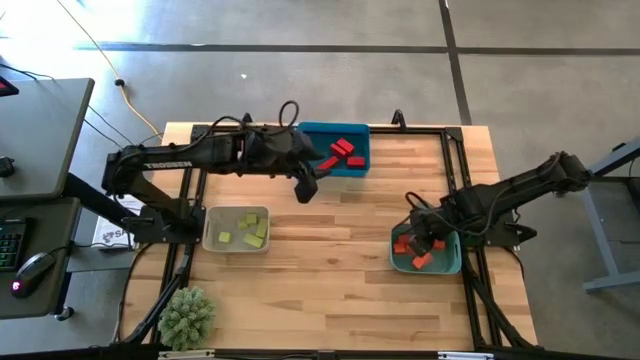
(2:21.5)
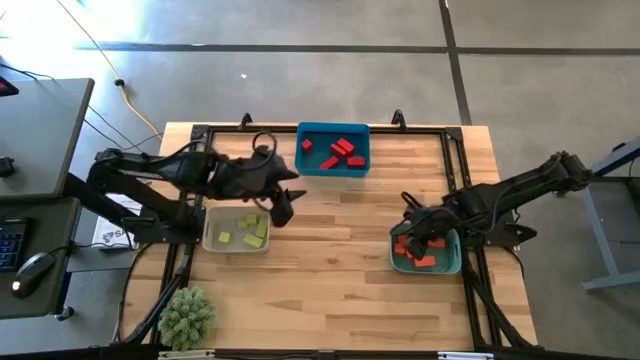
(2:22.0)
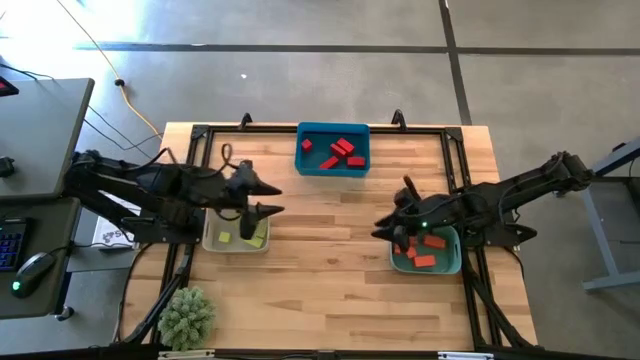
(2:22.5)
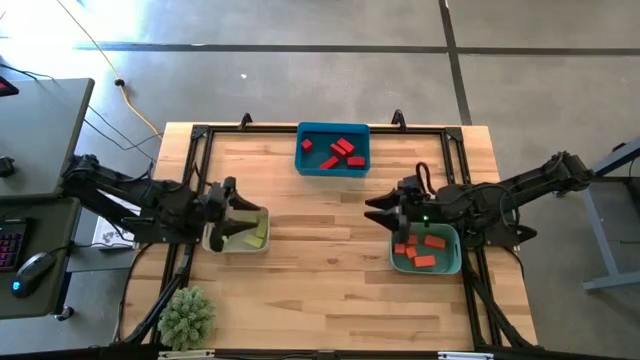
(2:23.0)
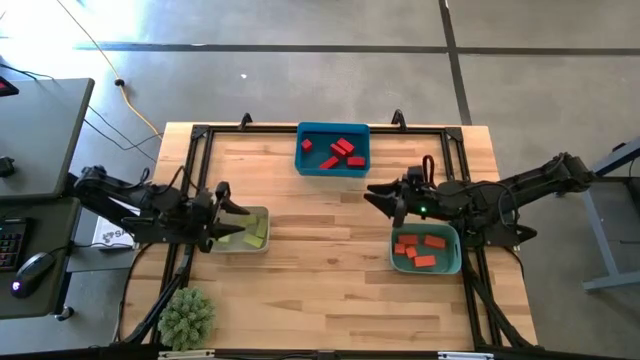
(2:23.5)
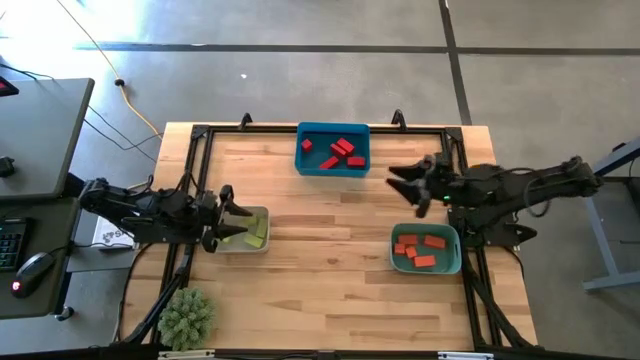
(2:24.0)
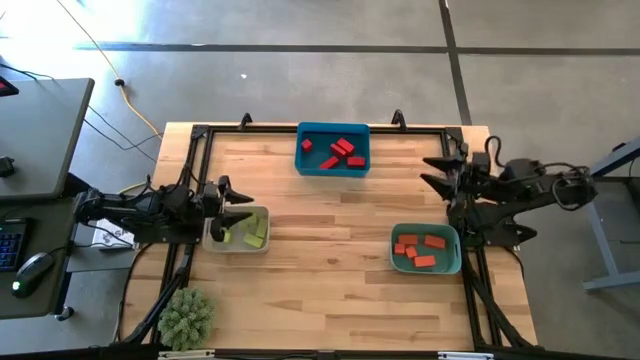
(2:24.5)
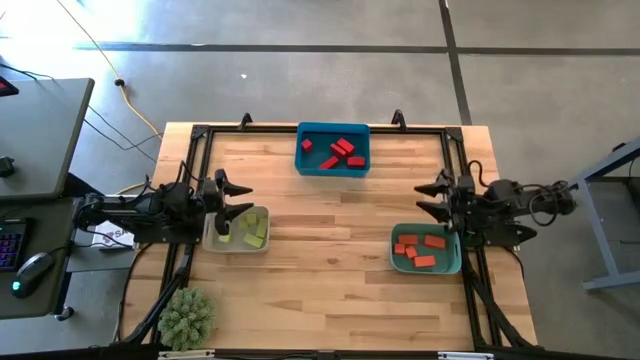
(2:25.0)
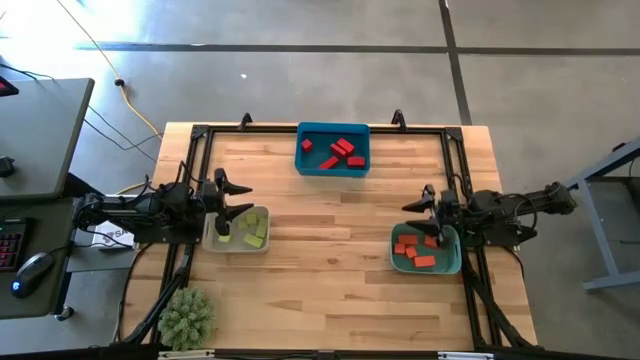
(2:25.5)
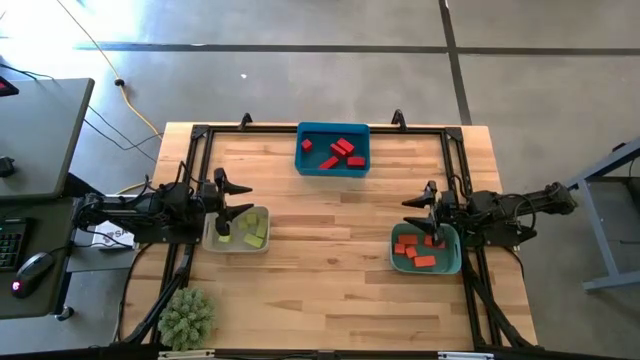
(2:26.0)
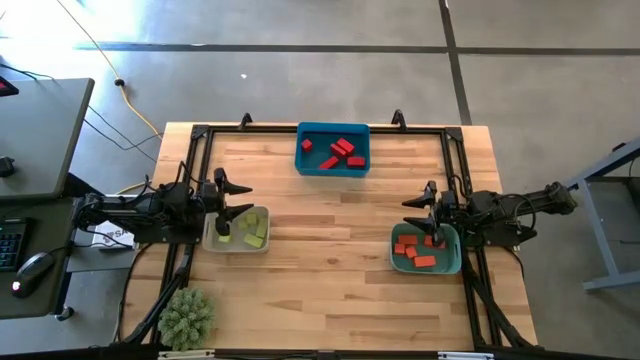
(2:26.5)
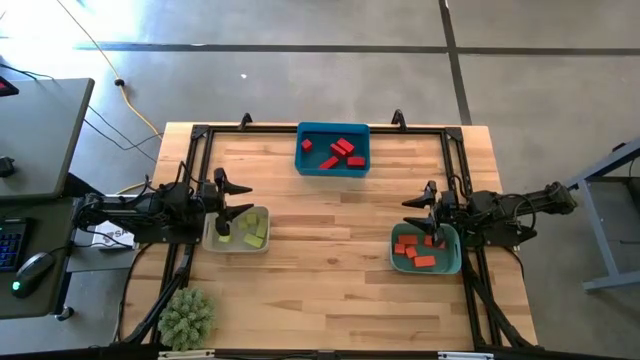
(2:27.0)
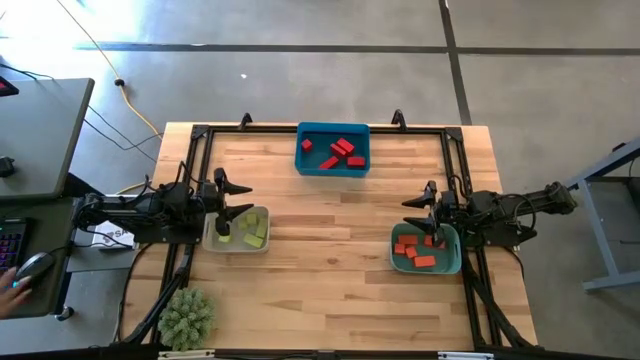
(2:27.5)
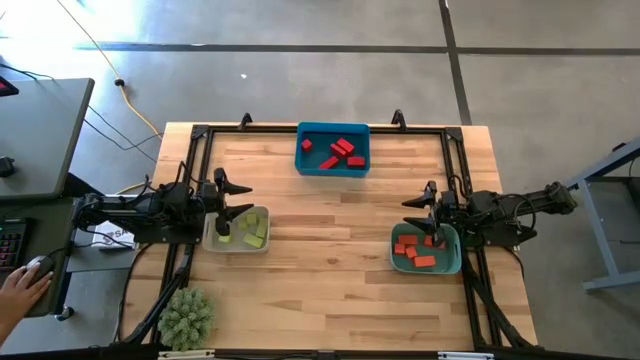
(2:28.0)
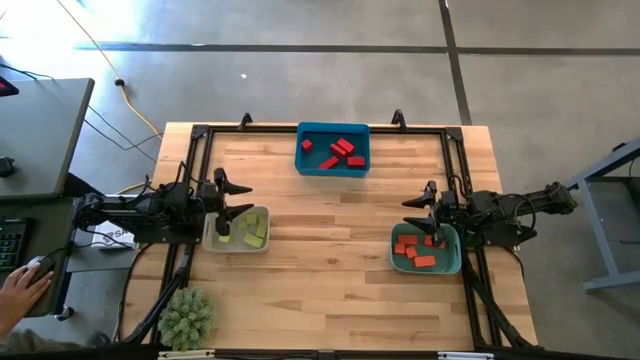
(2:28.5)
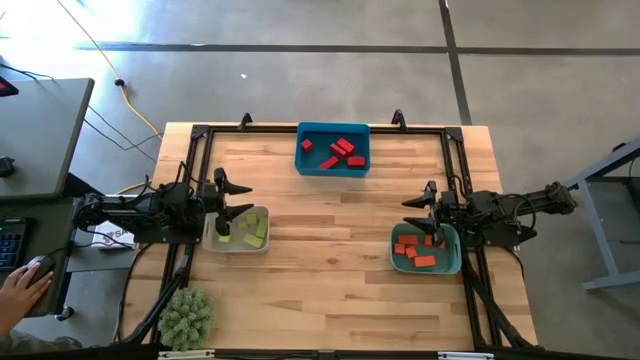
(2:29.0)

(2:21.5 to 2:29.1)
Task: Sort & place blocks by color
Return to Home Position

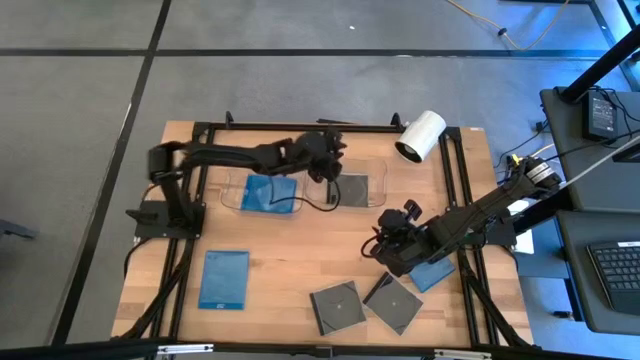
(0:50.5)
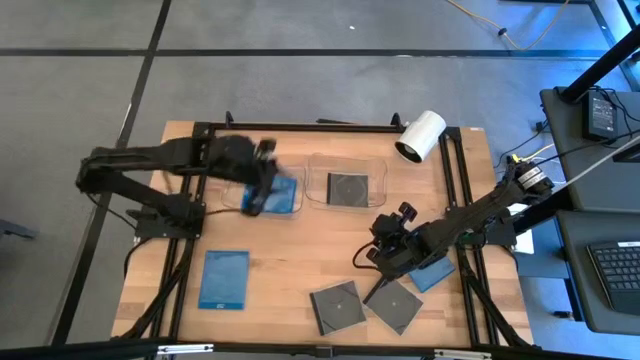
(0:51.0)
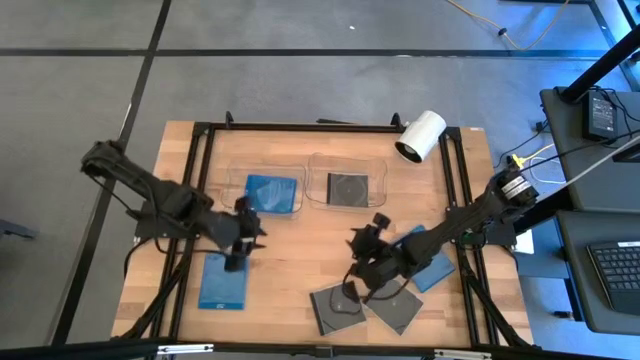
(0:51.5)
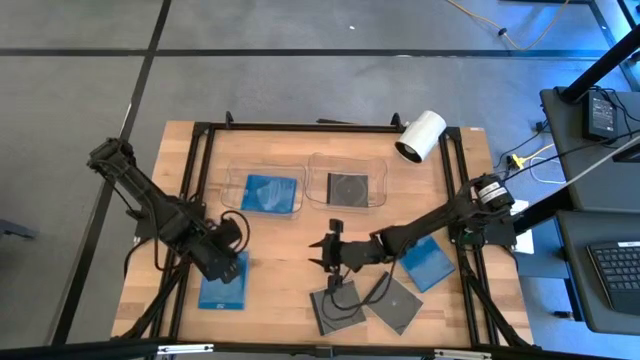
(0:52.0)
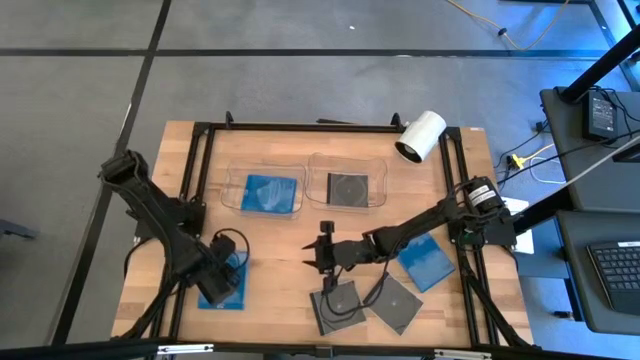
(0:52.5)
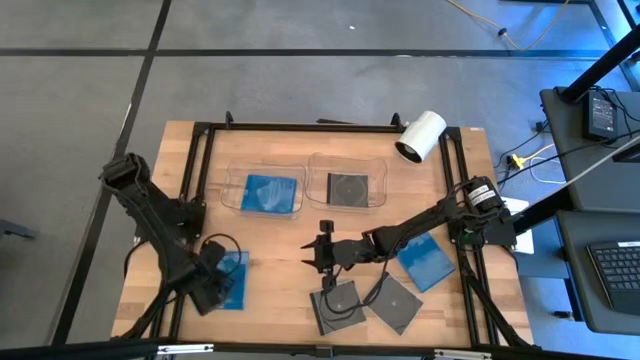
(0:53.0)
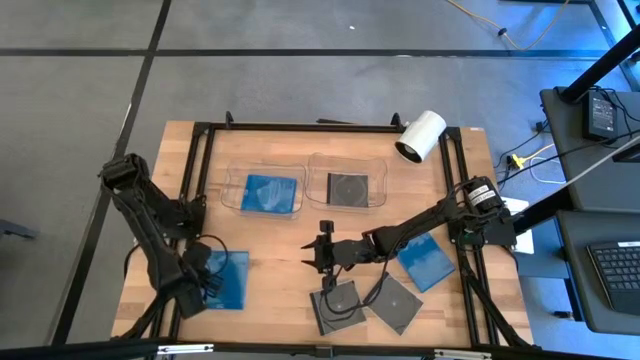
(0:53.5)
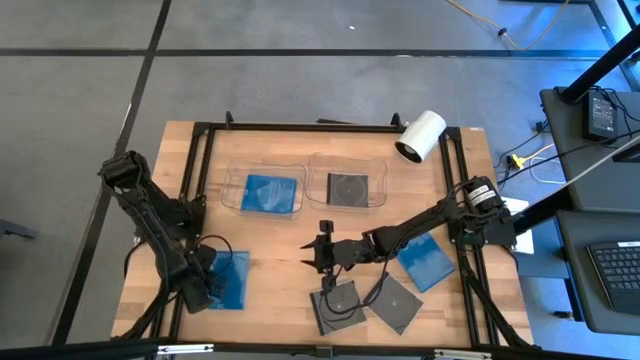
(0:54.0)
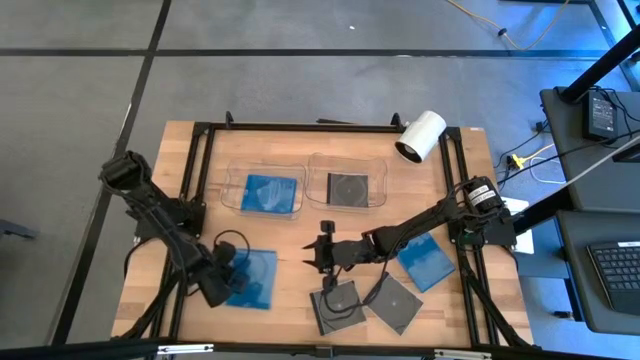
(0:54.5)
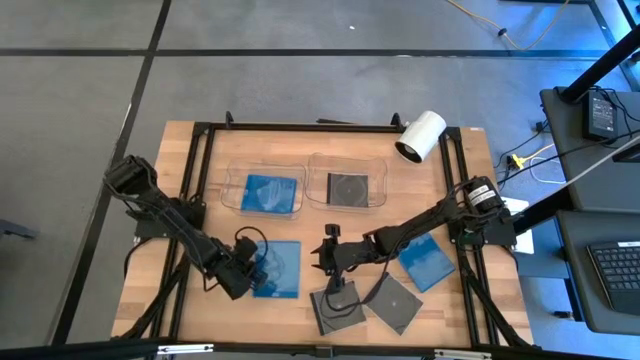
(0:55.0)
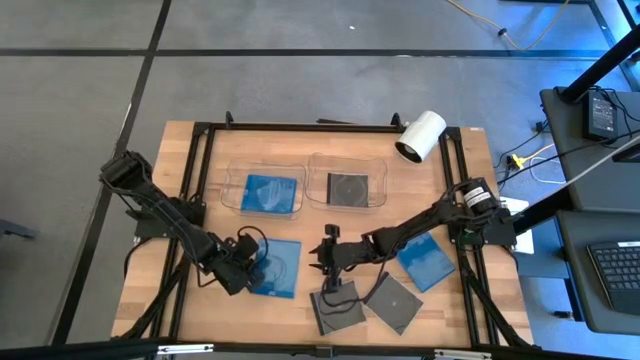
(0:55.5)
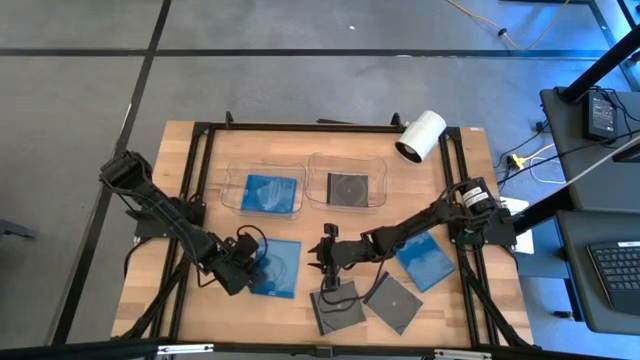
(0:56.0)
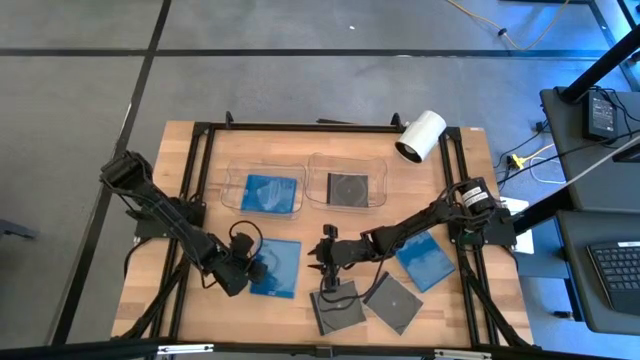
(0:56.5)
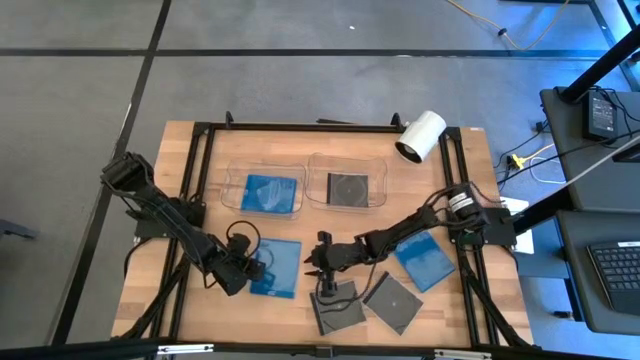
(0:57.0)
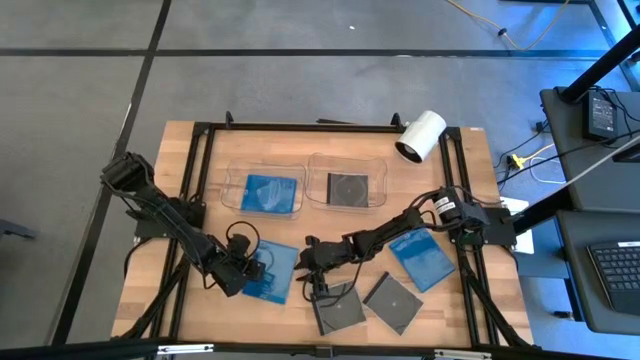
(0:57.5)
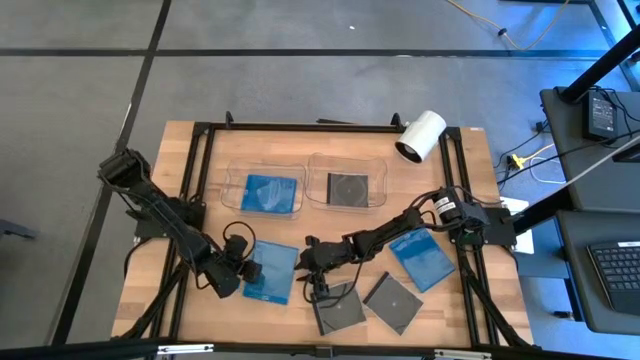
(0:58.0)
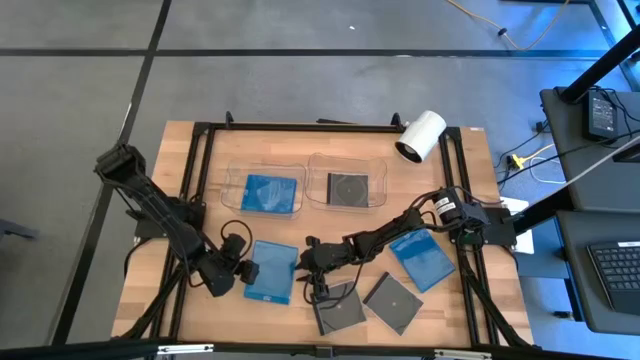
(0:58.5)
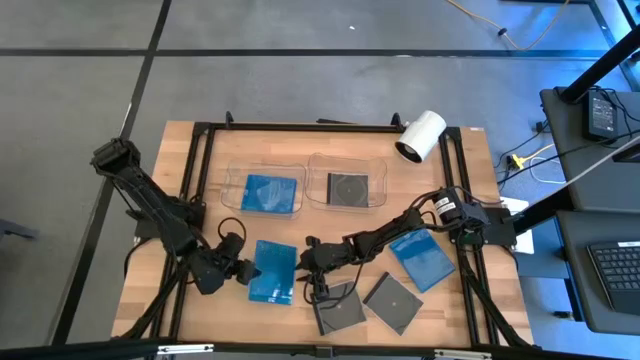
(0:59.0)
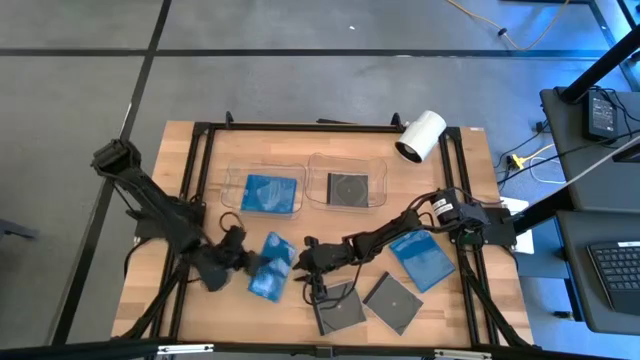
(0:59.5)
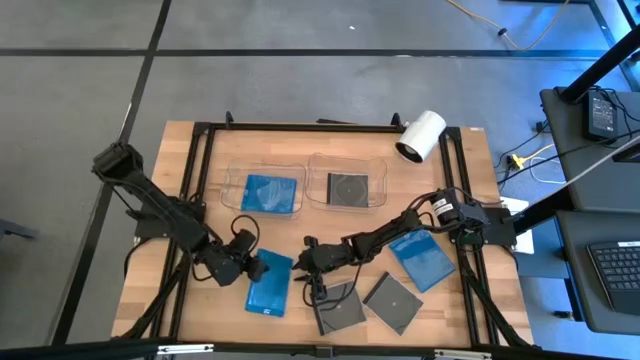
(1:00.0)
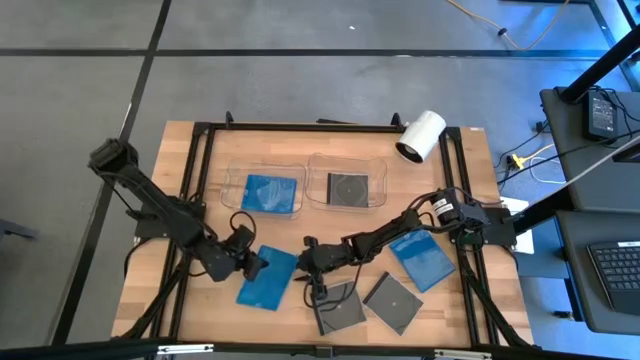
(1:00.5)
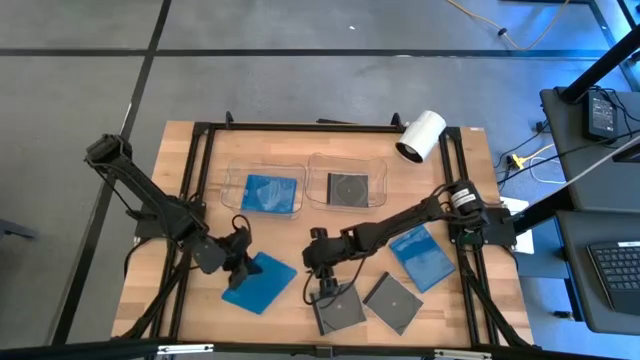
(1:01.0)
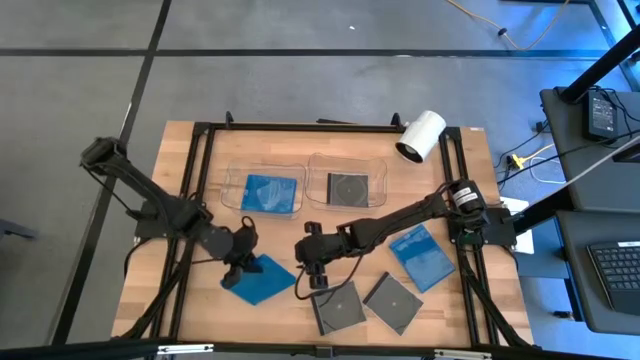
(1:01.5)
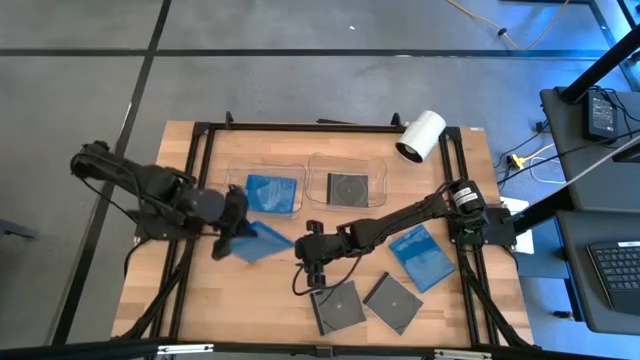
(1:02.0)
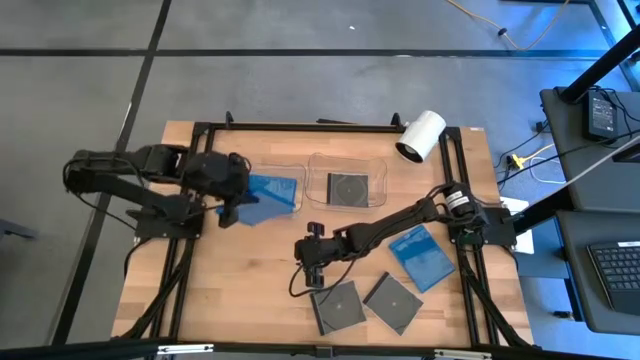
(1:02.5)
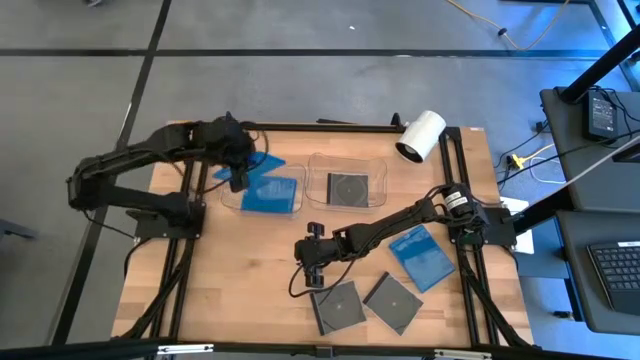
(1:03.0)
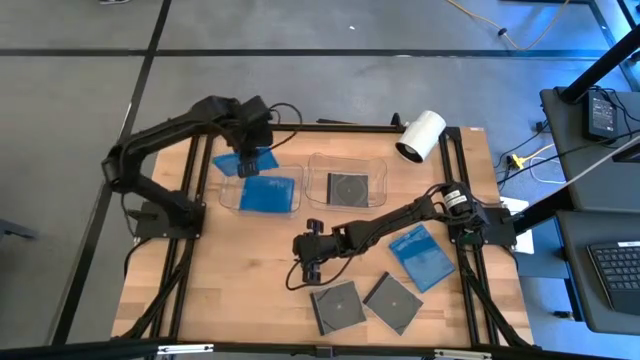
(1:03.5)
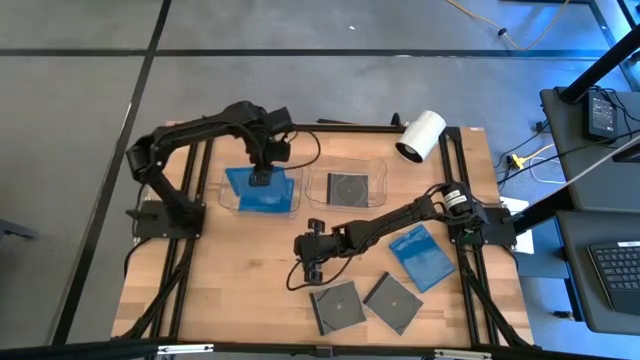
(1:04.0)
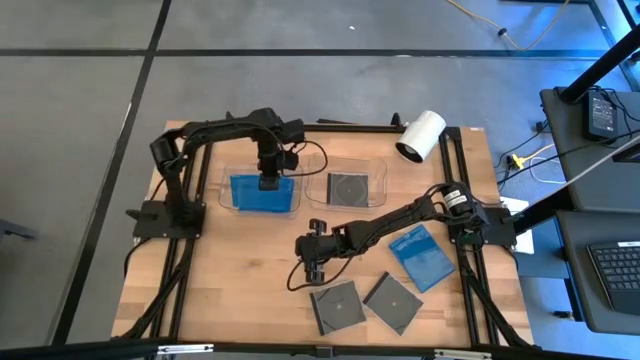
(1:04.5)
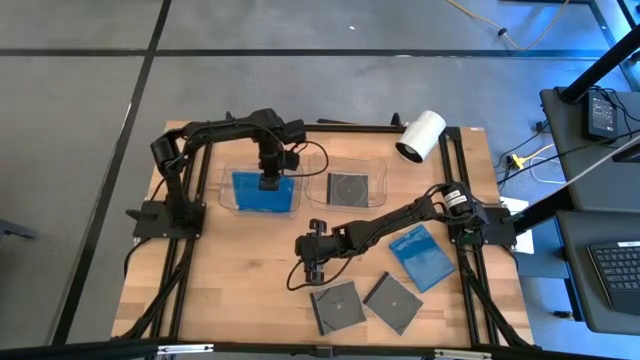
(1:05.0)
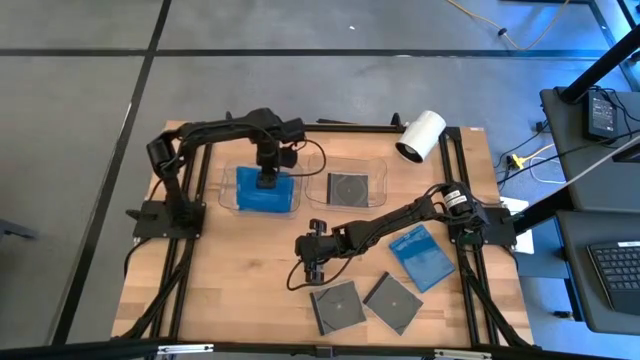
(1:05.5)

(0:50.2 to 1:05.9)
Task: Pick & place jewel cases by type
Put the left blue CD case into the left transparent bin
